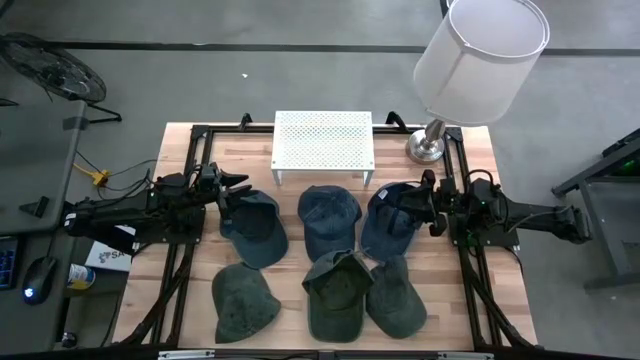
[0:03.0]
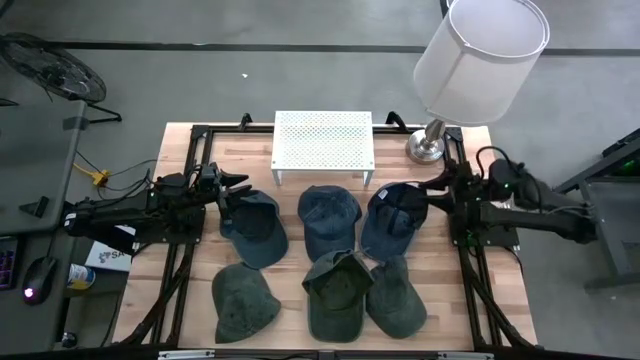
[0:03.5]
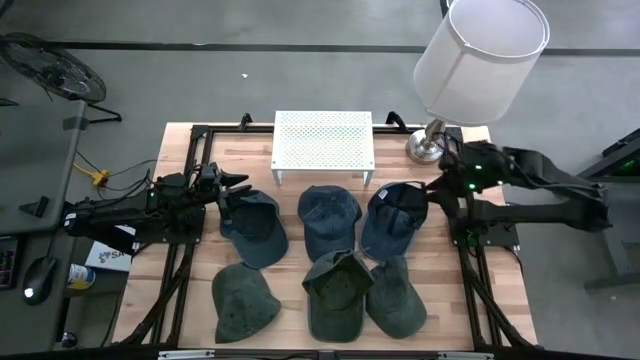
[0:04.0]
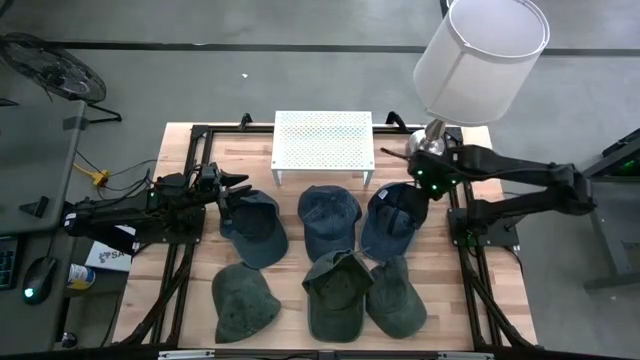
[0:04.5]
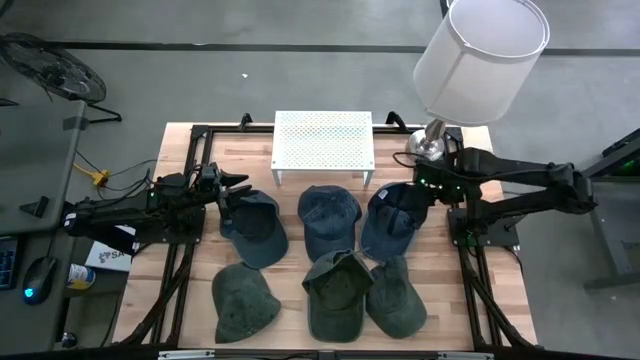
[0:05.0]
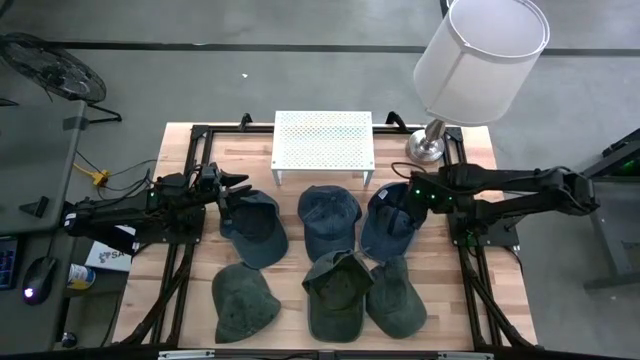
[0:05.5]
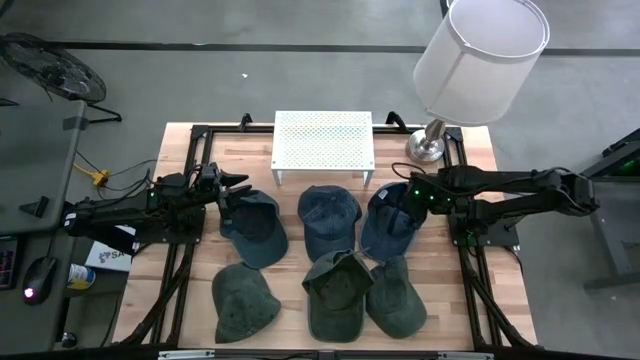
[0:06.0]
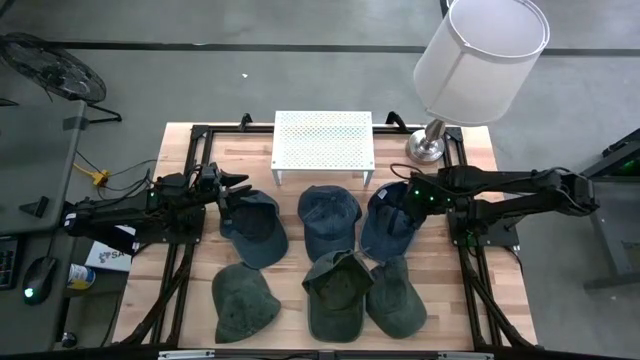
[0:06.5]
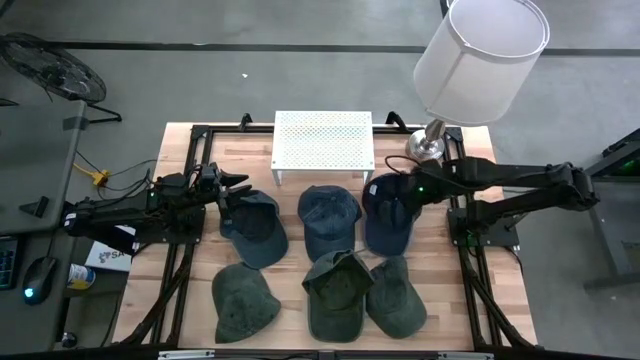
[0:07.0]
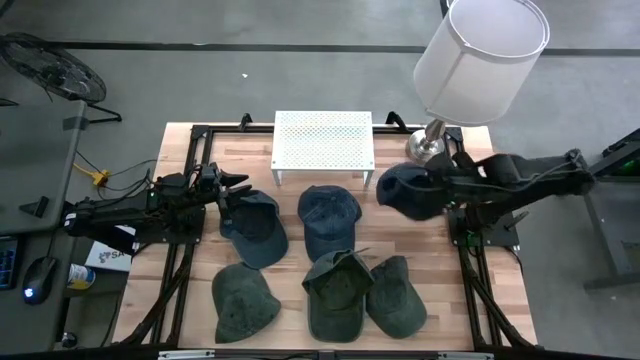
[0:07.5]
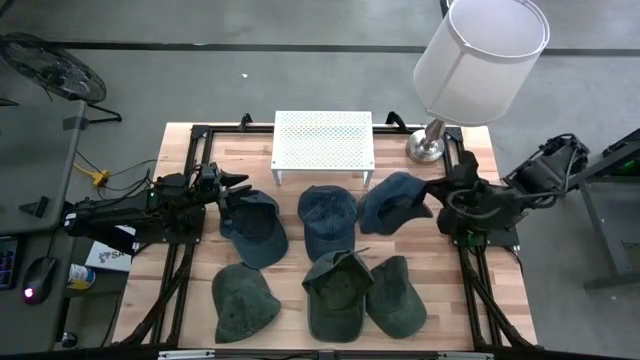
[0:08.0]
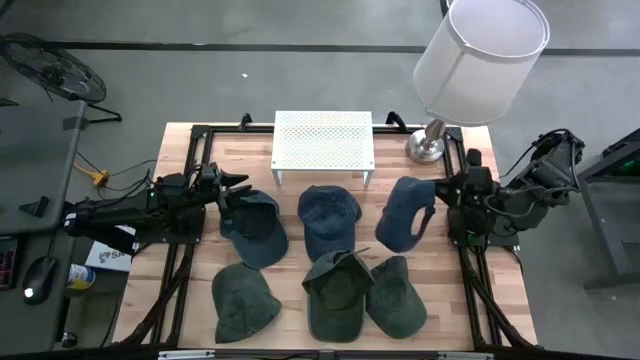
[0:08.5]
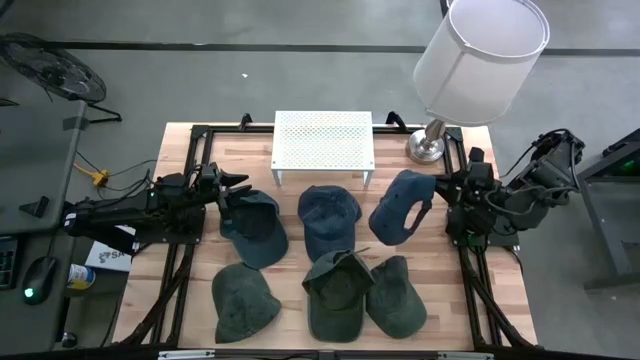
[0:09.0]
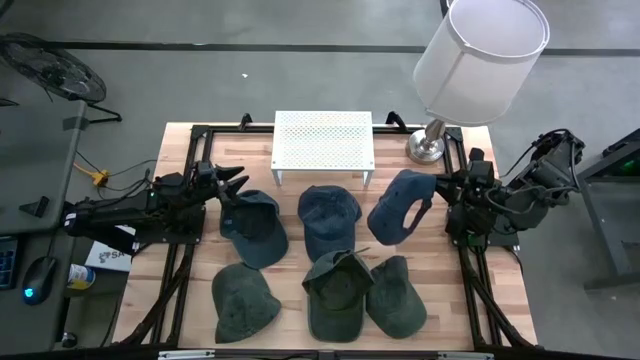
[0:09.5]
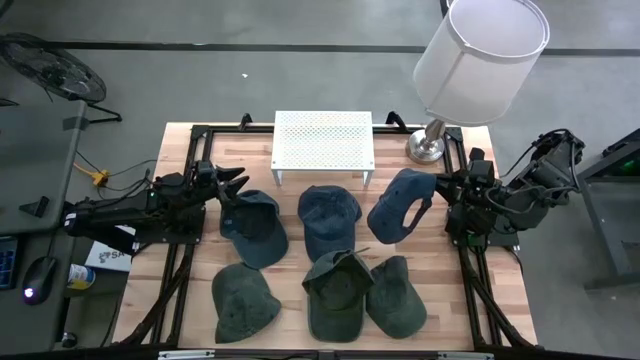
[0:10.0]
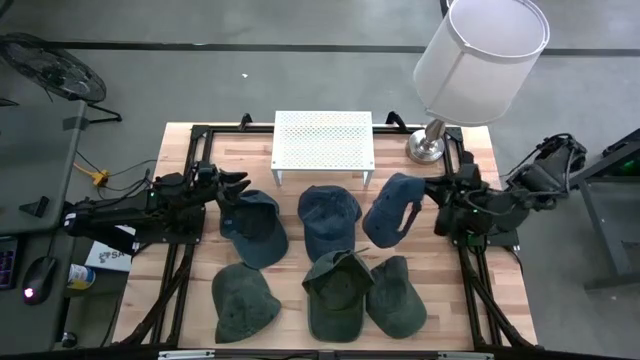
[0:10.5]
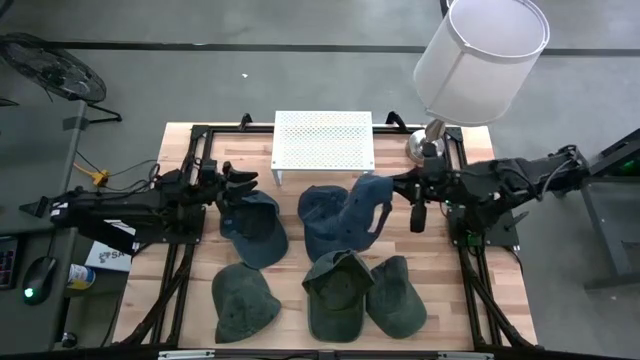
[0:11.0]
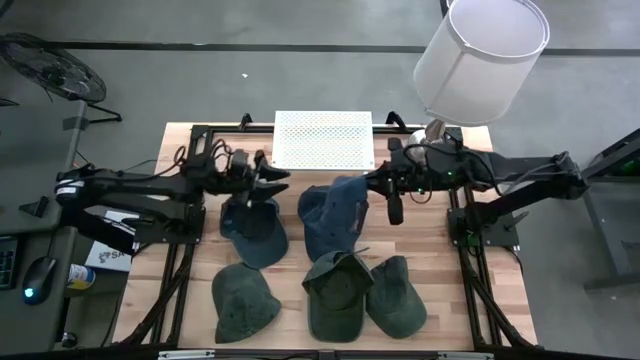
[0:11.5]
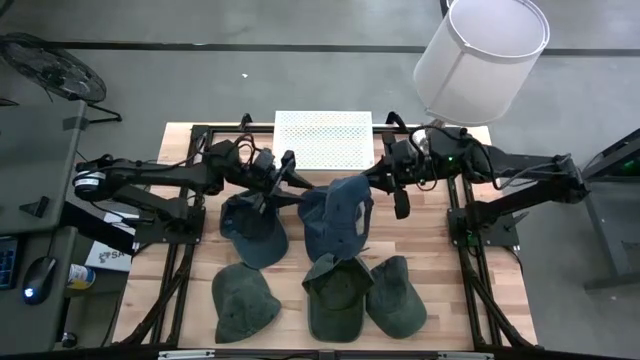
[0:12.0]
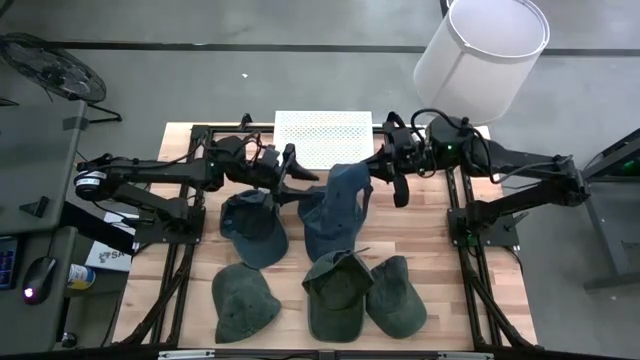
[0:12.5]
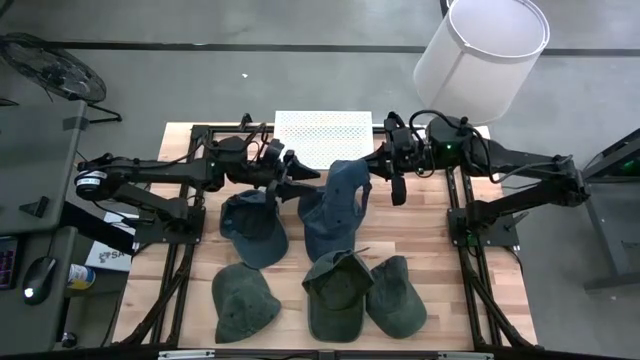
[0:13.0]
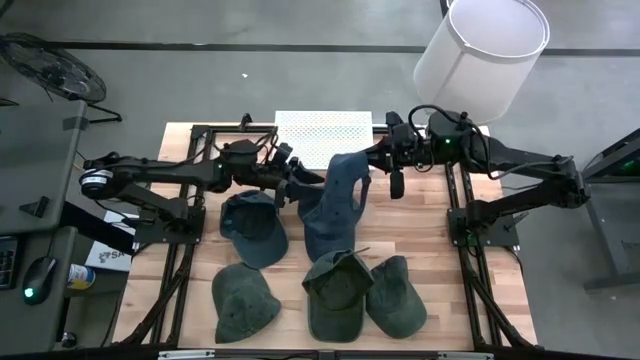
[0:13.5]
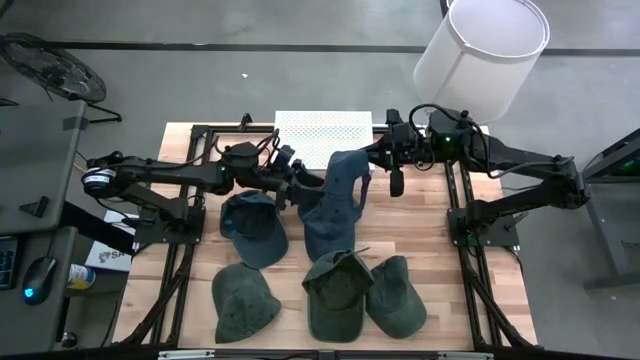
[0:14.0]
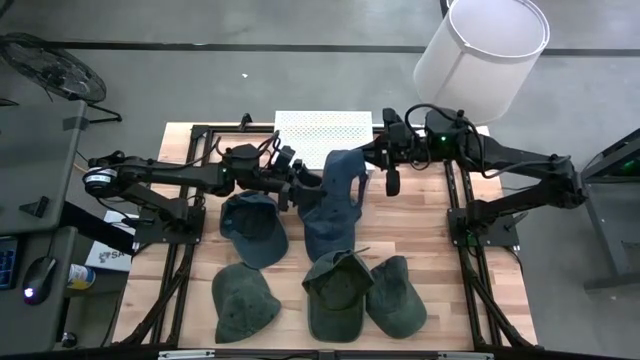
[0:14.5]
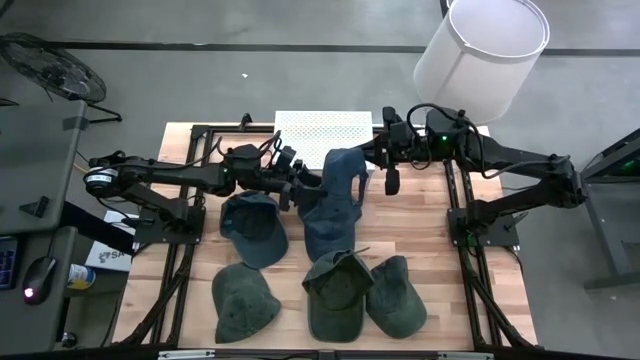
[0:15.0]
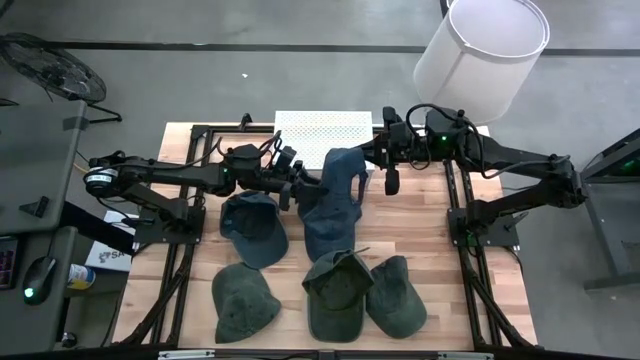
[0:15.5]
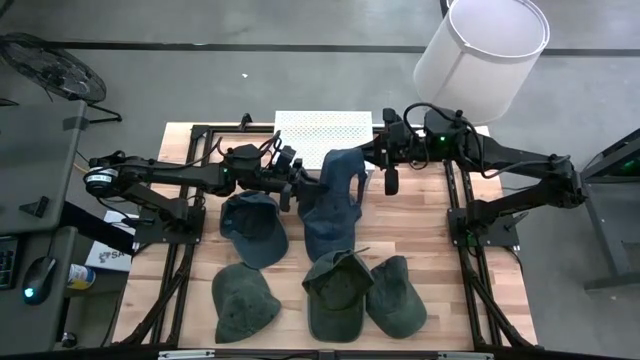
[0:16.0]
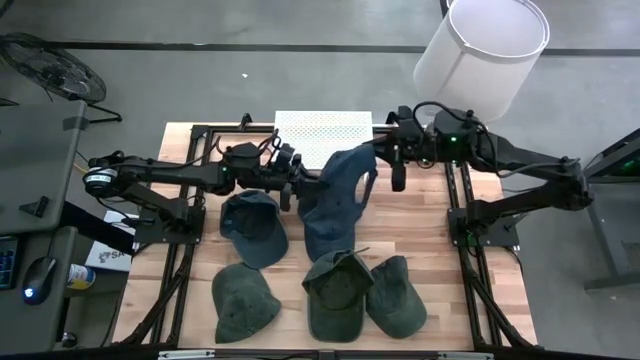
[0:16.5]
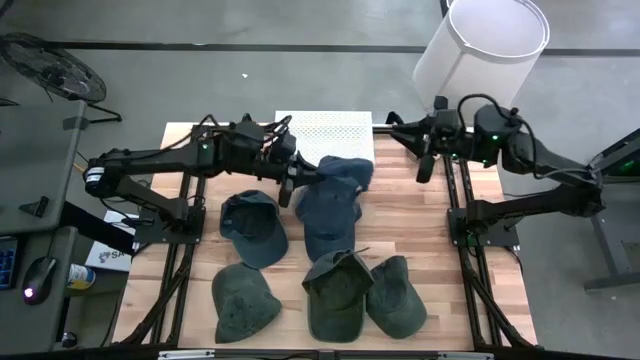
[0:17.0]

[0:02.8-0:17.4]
Task: Pick & Place hat
Put the right blue cap on the shelf

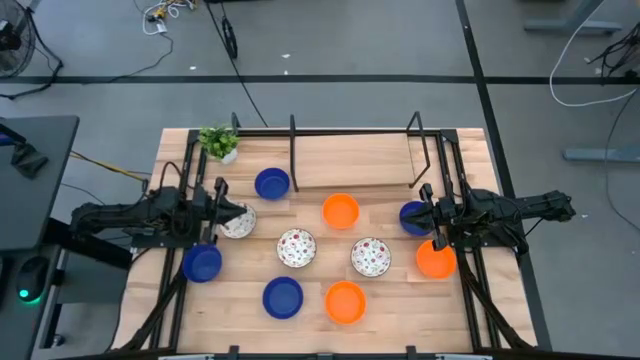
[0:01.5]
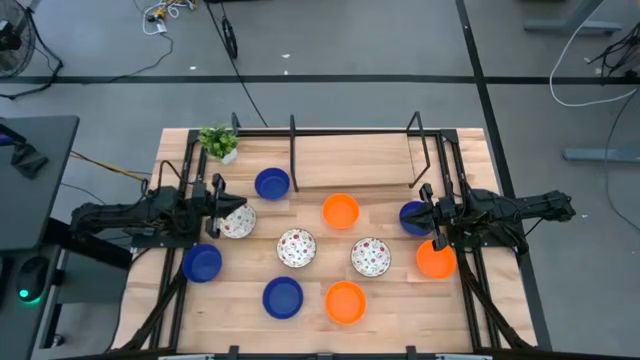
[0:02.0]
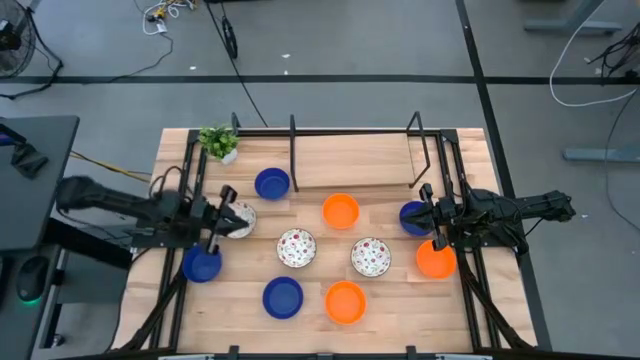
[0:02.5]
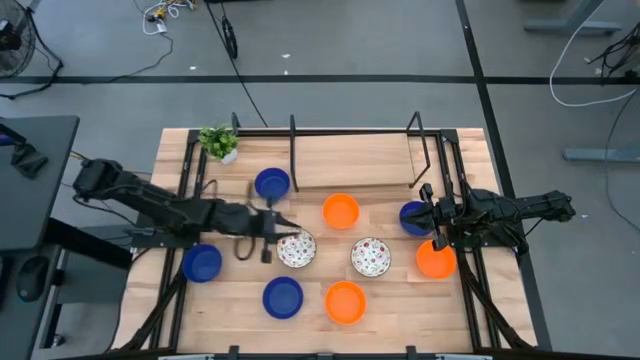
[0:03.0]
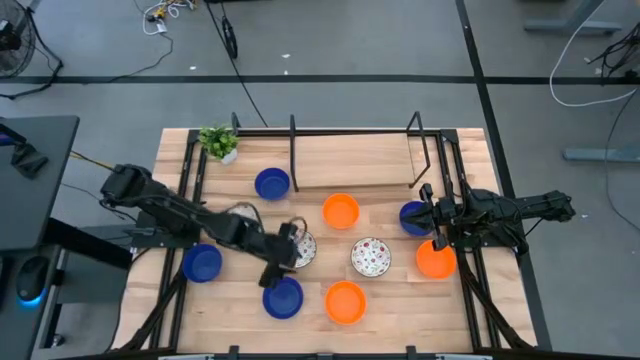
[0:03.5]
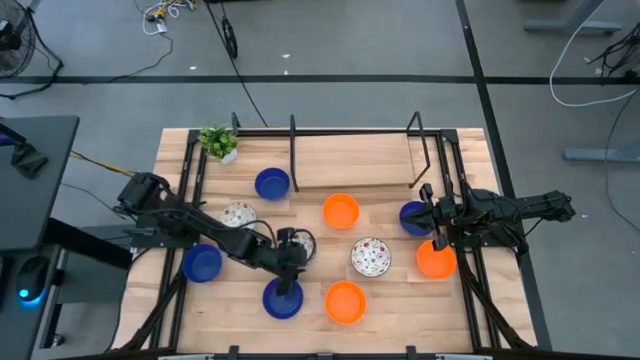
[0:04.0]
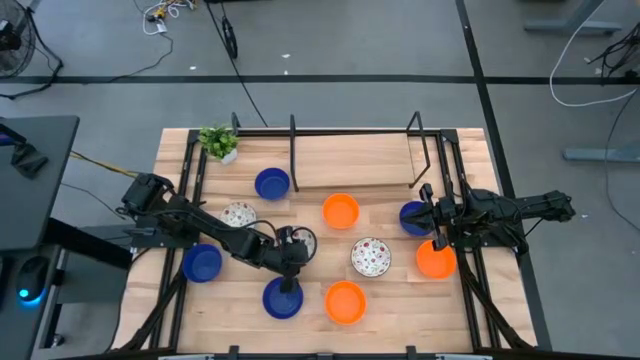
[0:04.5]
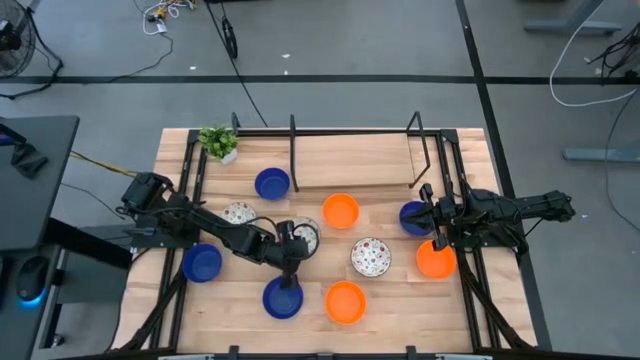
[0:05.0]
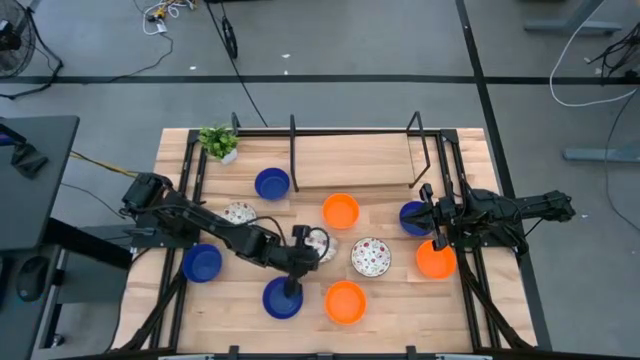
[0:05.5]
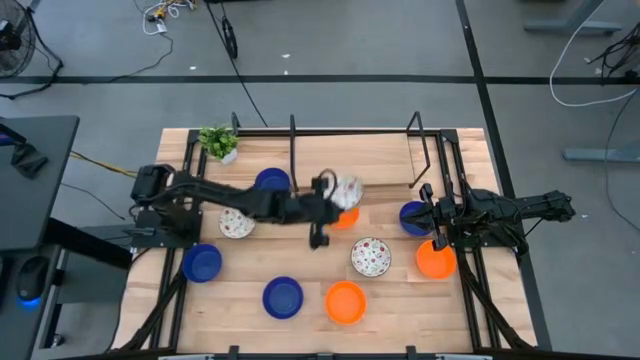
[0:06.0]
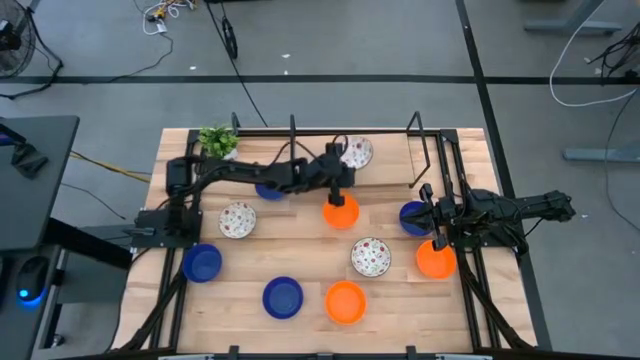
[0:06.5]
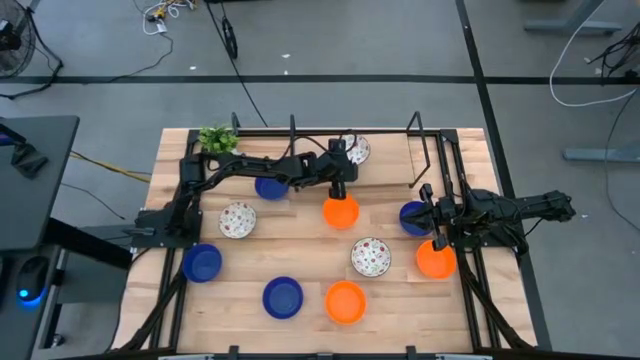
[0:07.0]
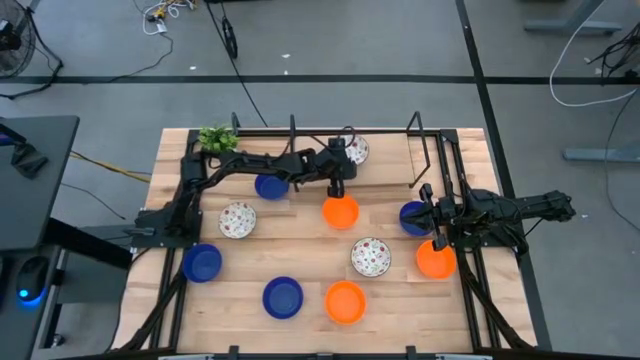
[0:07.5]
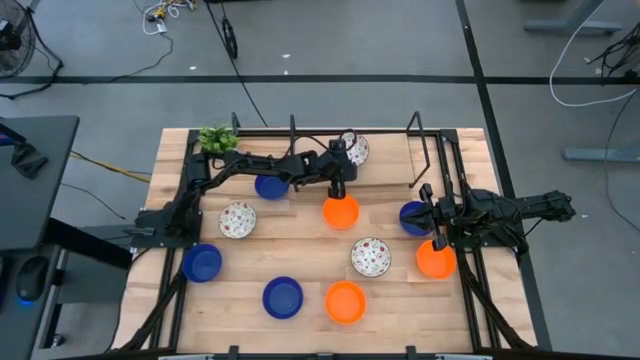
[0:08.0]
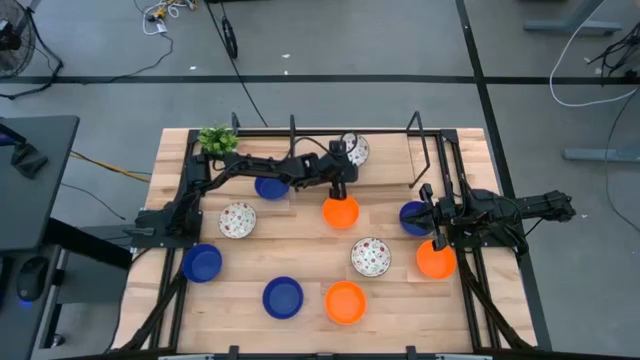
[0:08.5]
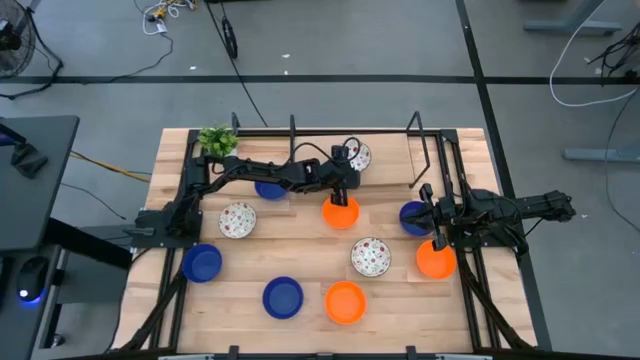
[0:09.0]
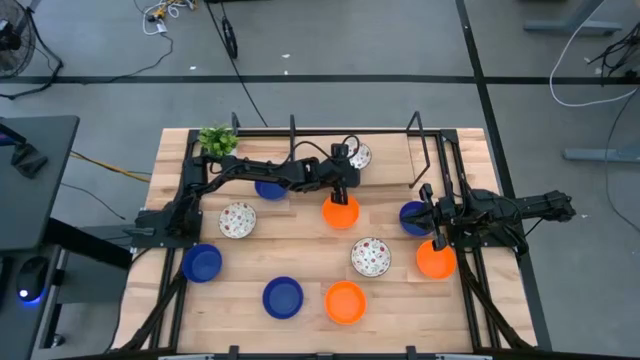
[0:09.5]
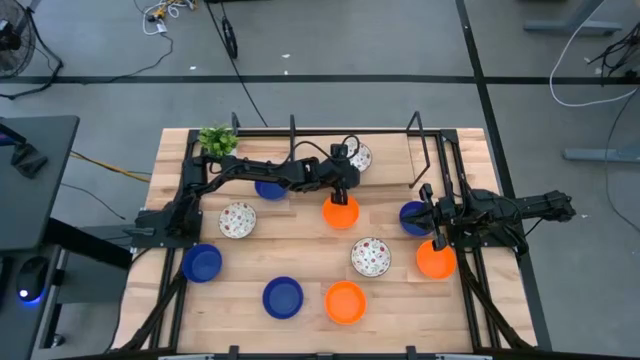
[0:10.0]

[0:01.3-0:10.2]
Task: Pick & Place Mini bowls
Put the white bowl on the shelf
